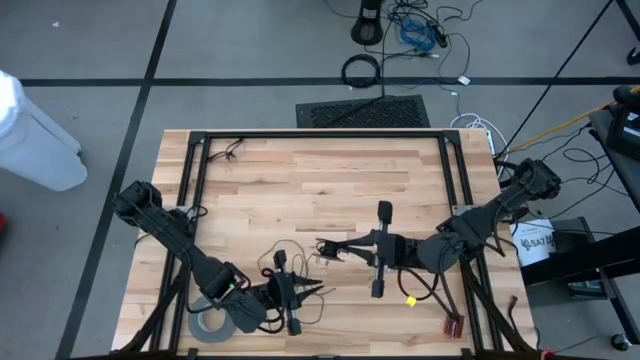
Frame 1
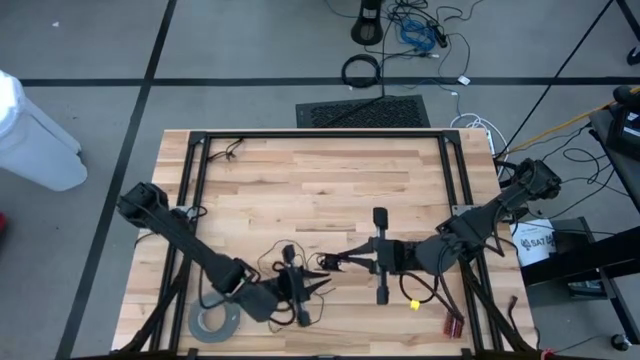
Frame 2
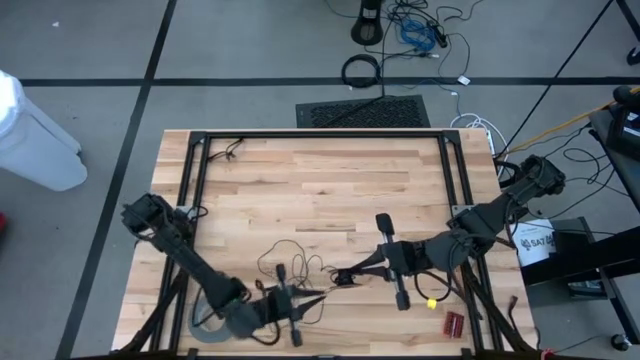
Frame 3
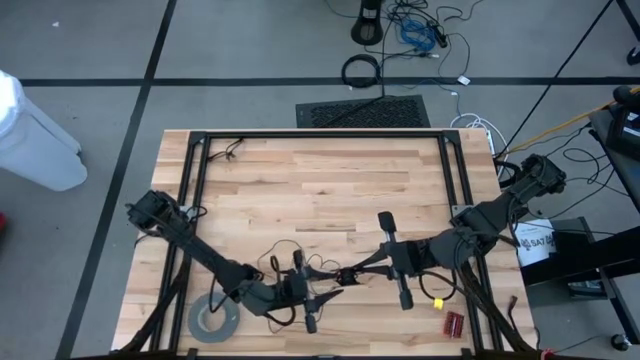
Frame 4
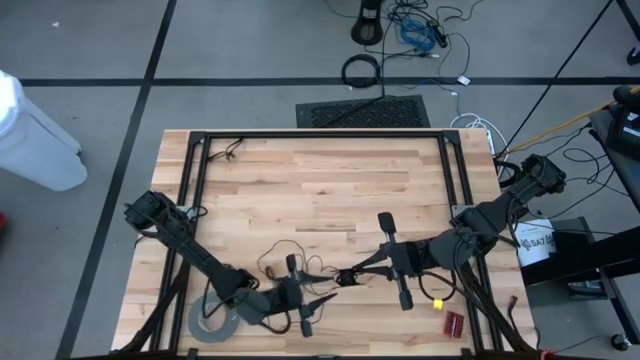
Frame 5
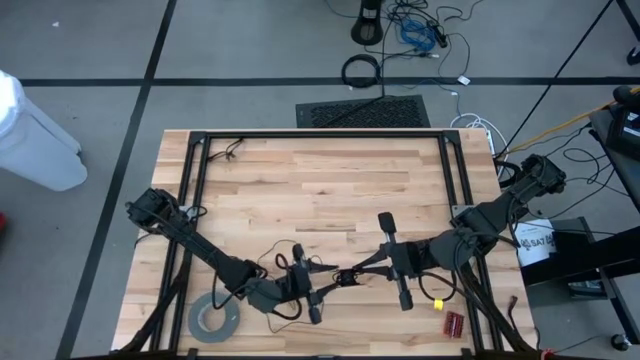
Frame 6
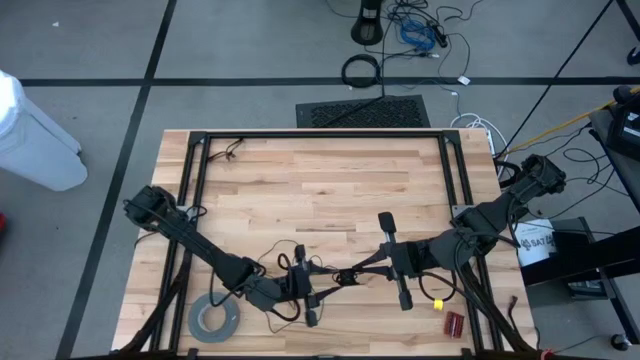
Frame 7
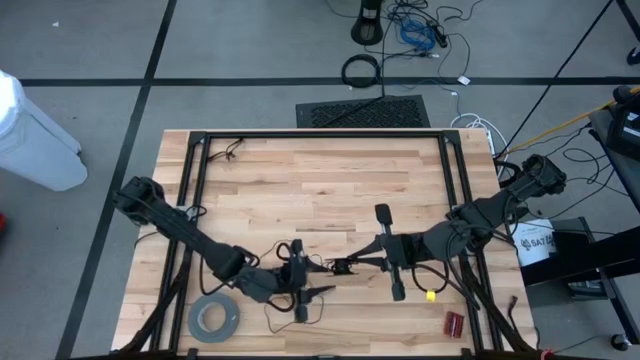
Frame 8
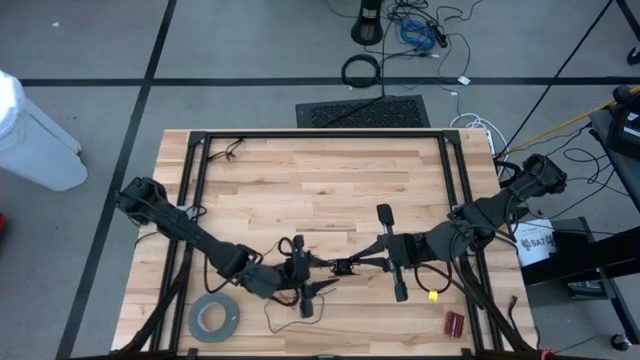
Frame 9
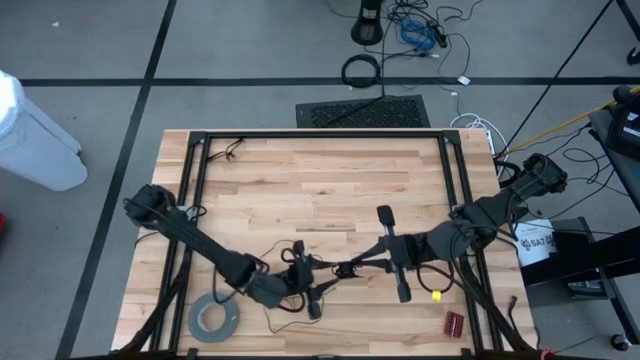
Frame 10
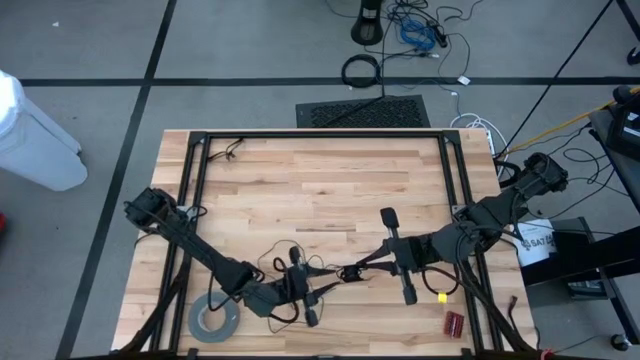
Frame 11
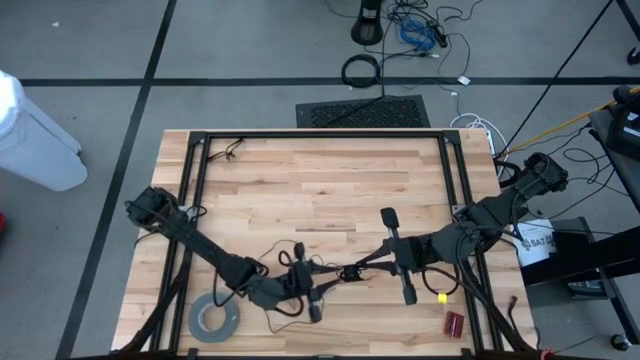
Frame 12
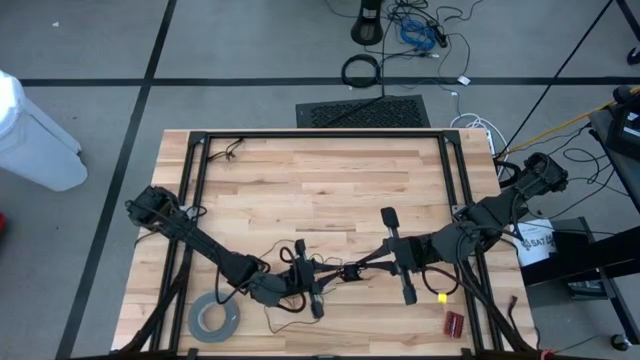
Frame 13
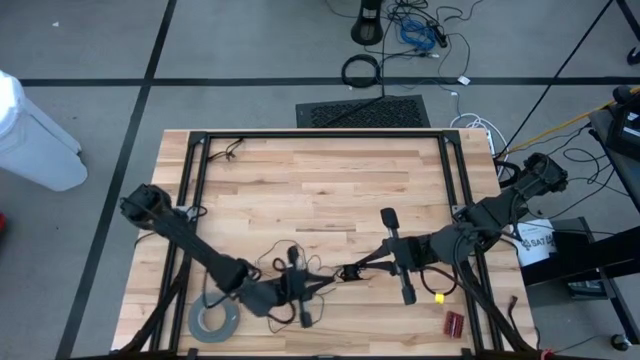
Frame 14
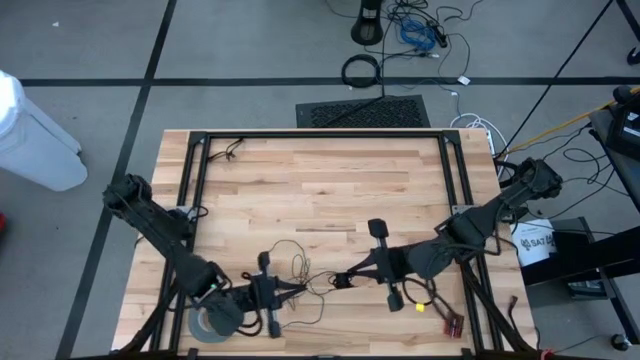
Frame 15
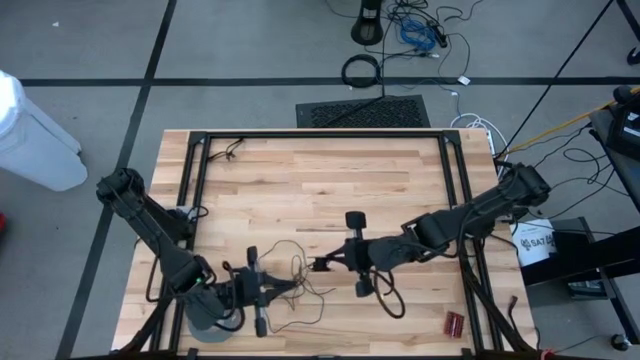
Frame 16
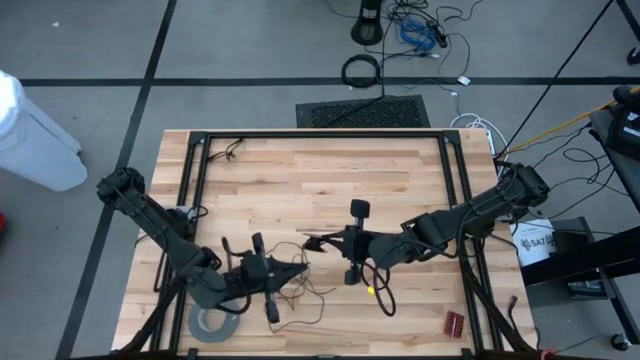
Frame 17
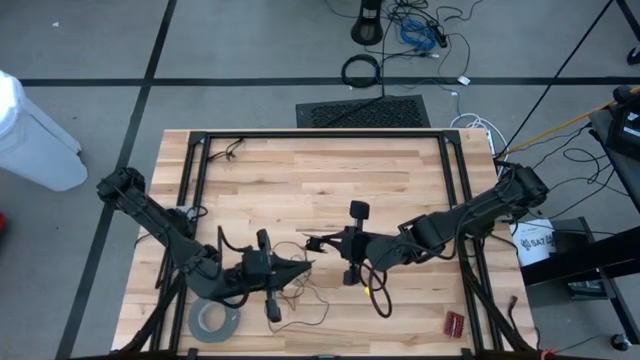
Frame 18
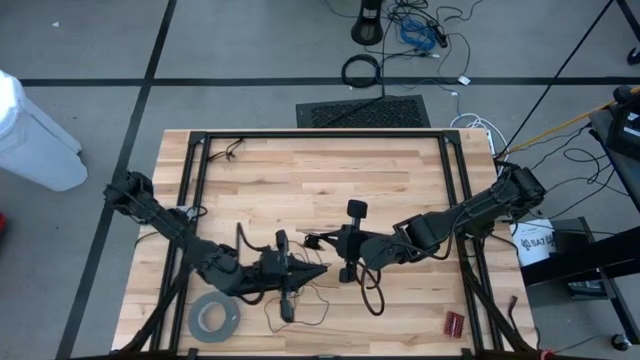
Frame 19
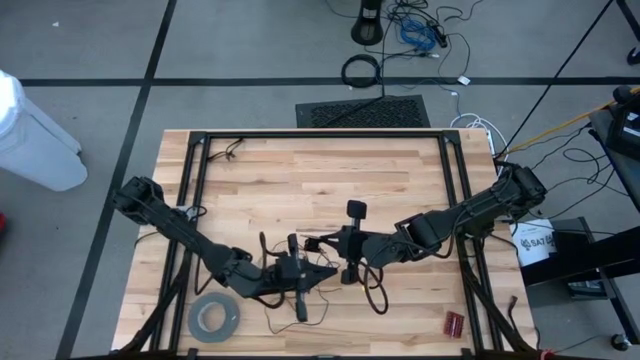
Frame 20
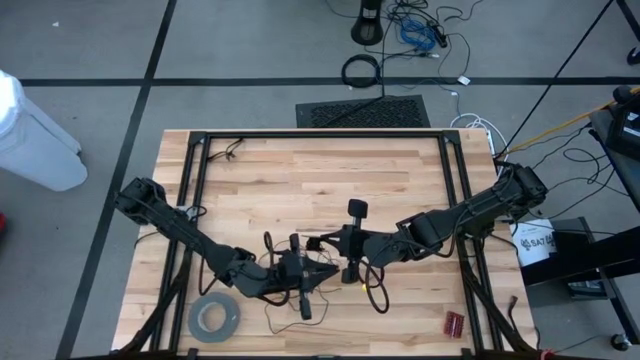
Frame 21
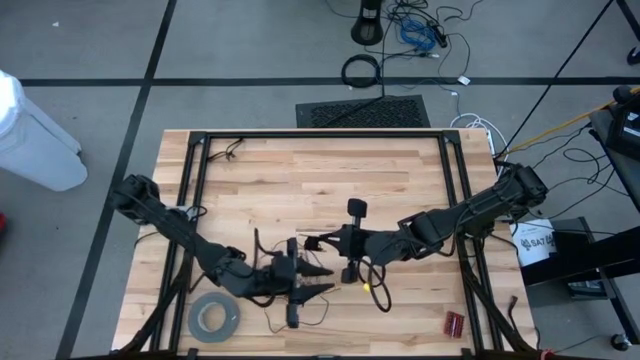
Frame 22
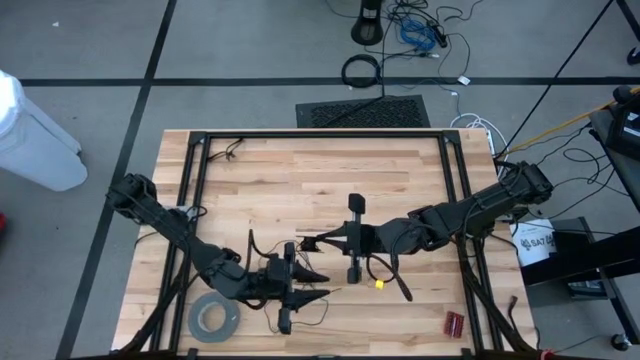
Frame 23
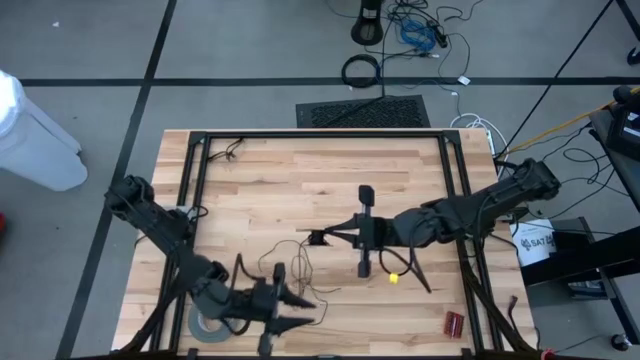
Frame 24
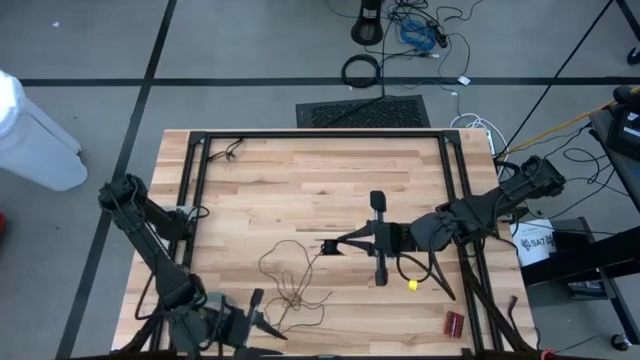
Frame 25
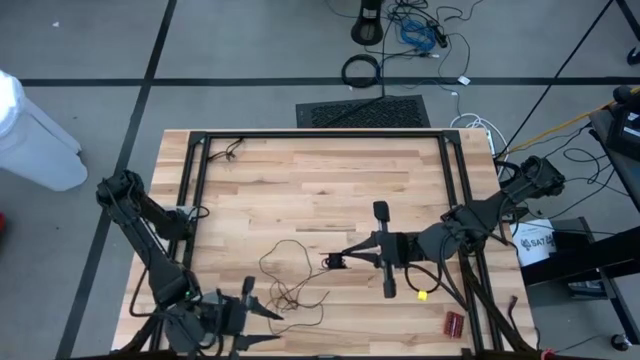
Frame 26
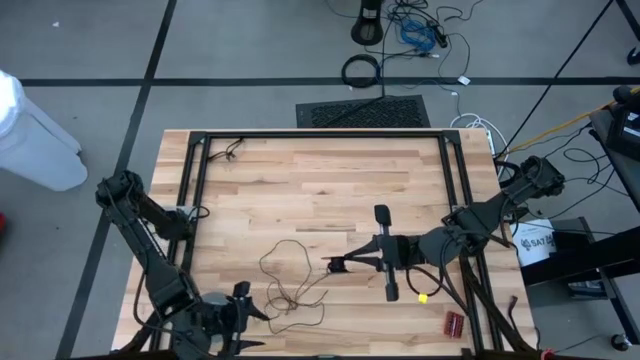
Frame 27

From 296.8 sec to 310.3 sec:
Task: Coil cords
Coil the black wire onto the spool

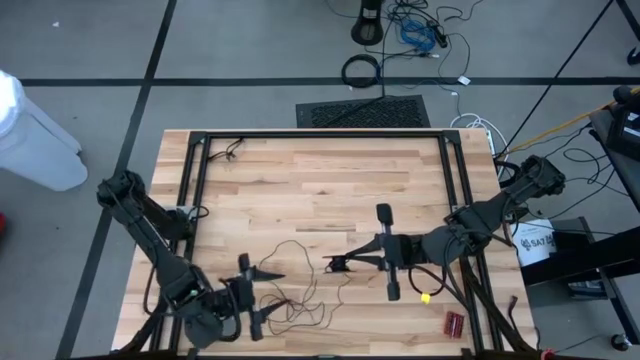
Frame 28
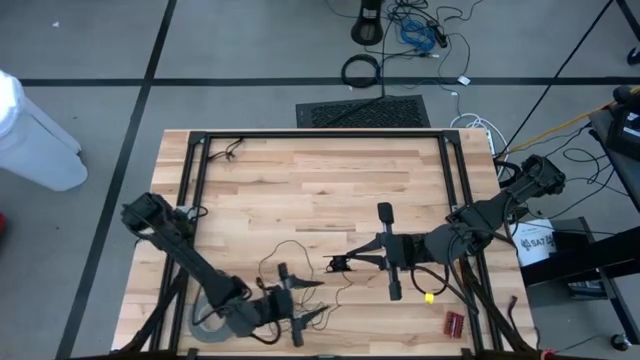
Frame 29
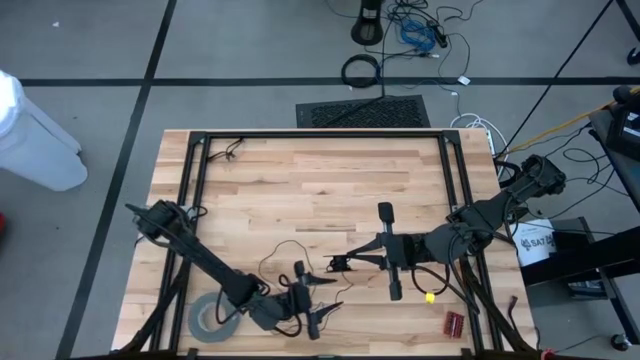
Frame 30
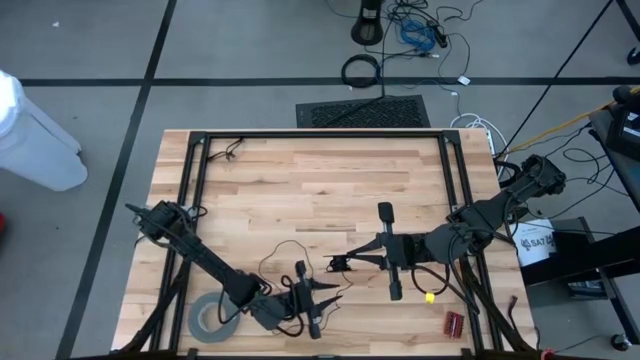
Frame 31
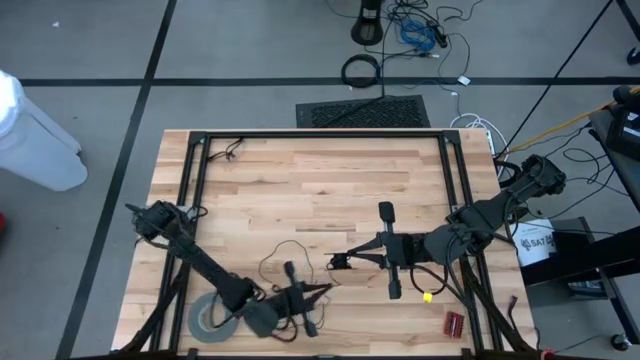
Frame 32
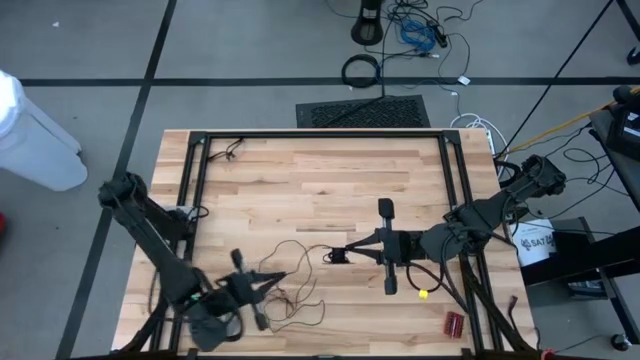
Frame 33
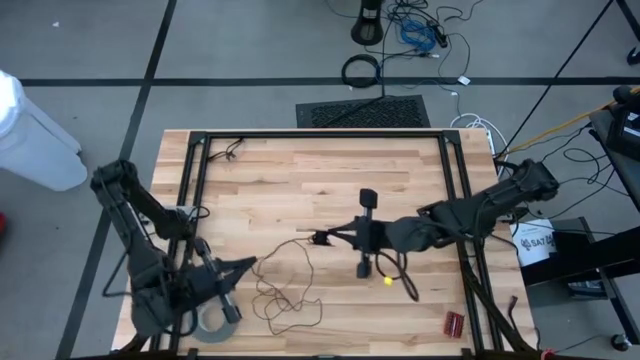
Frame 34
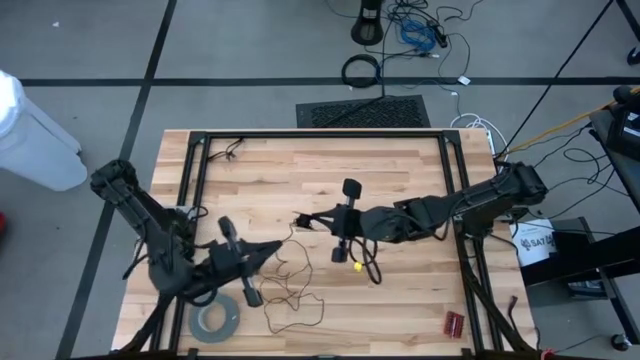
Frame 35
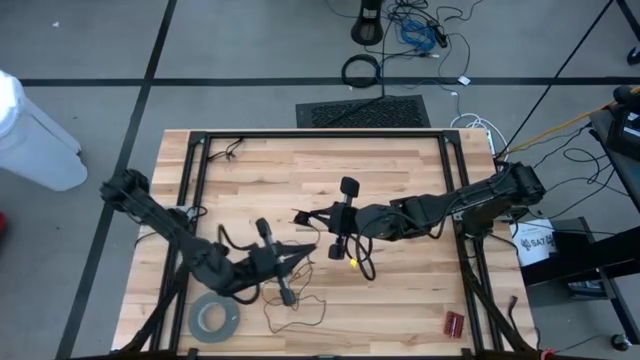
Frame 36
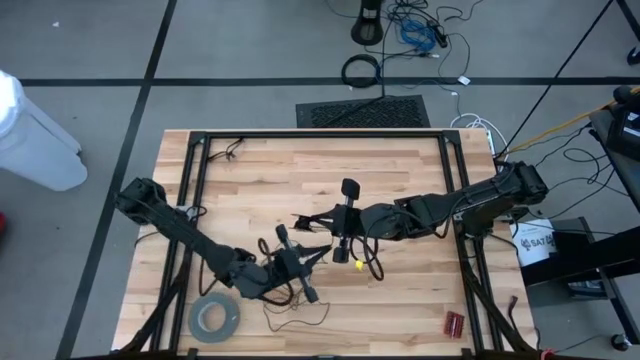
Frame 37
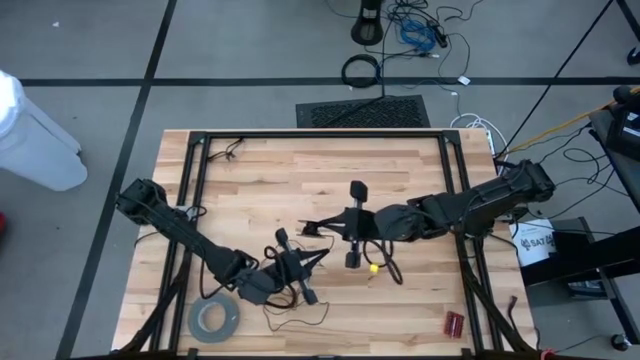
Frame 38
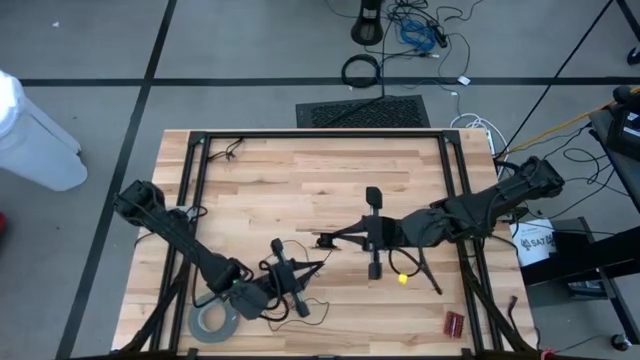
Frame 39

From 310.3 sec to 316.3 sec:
Coil the black wire onto the spool
